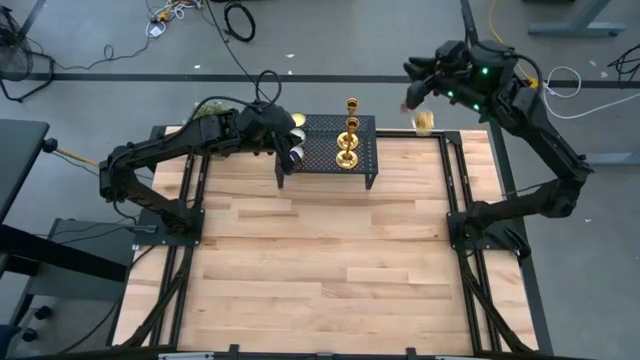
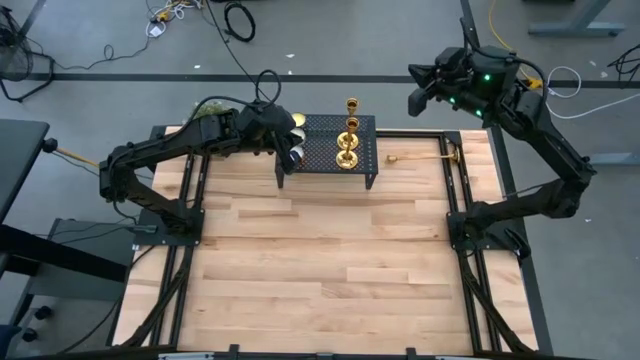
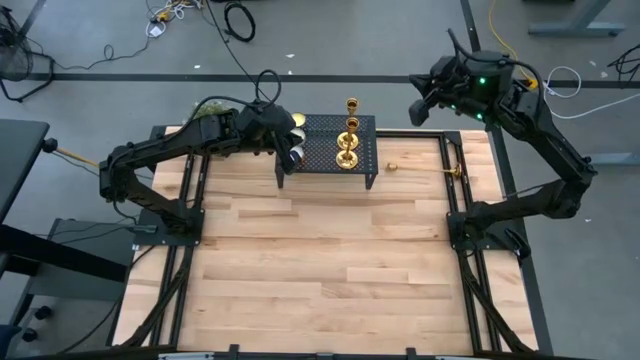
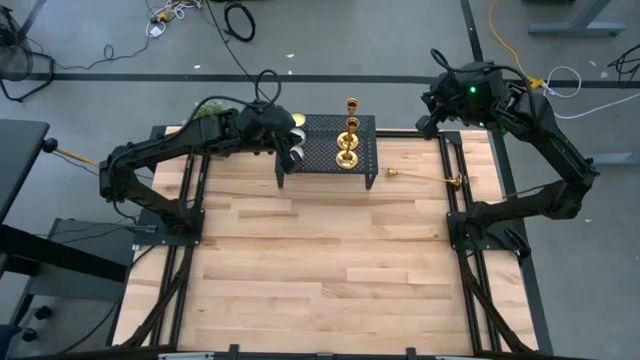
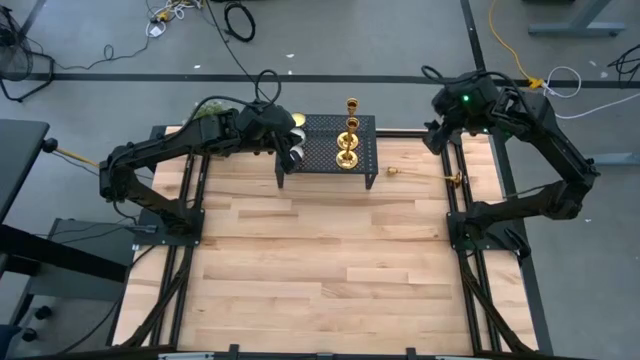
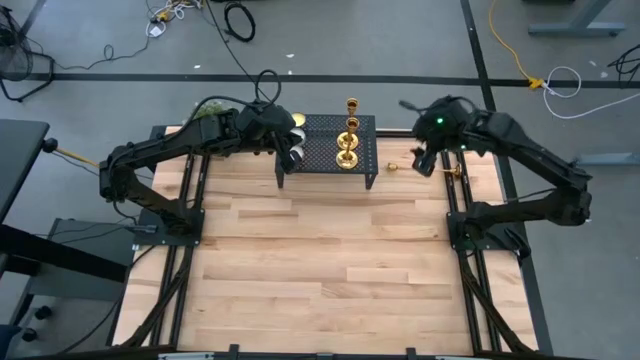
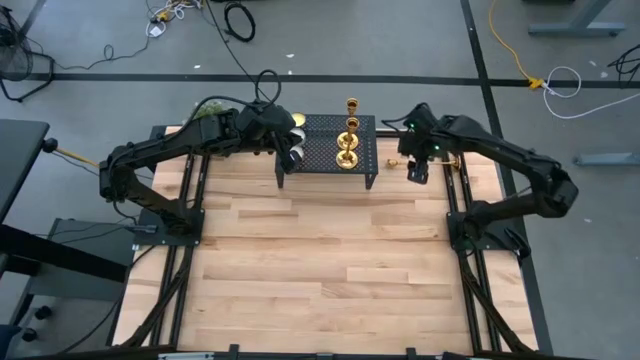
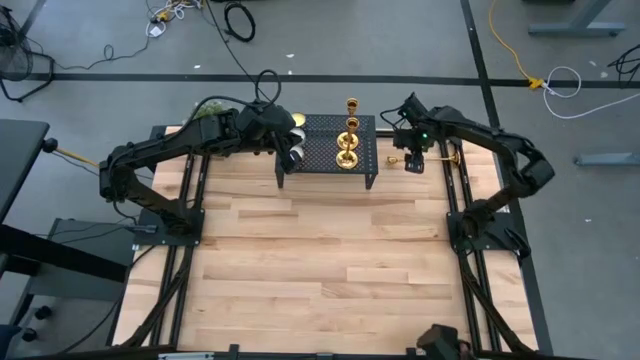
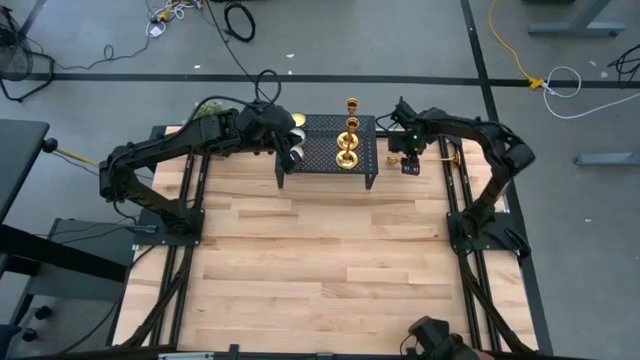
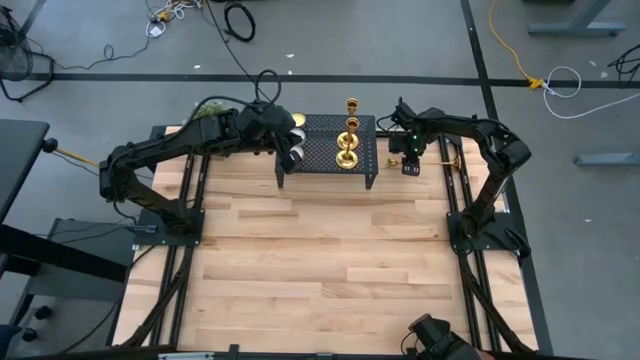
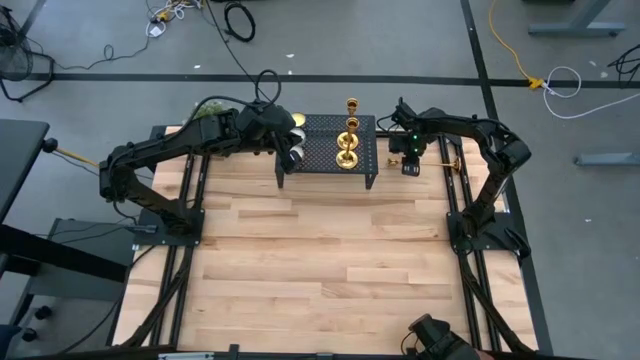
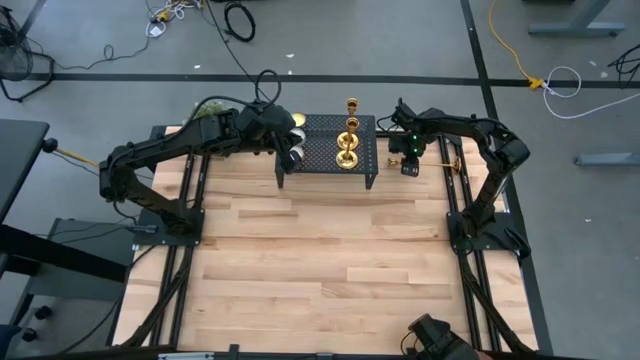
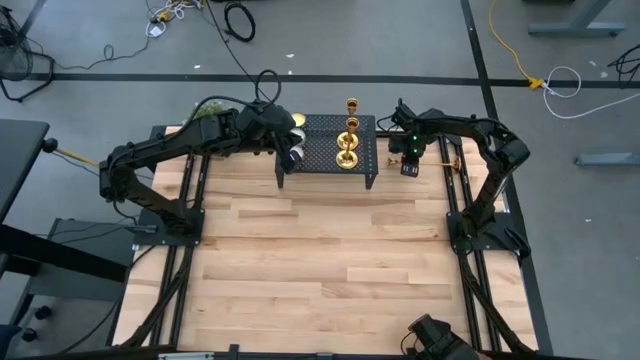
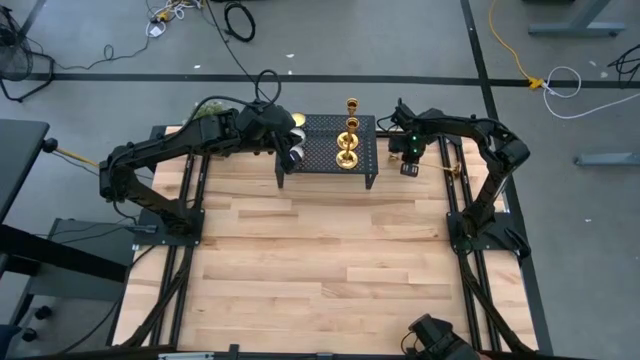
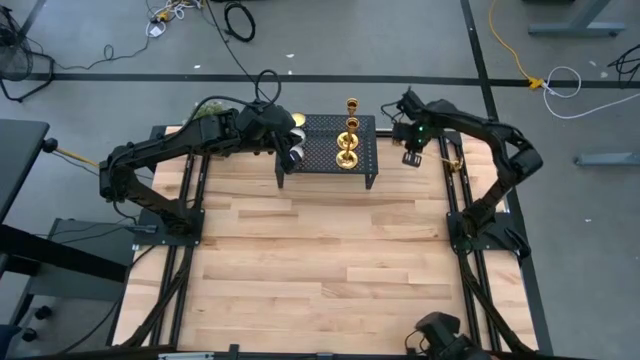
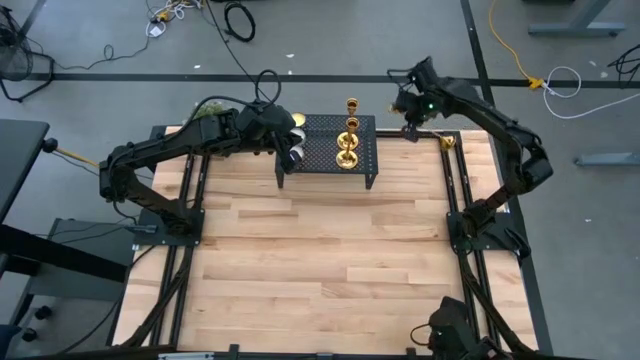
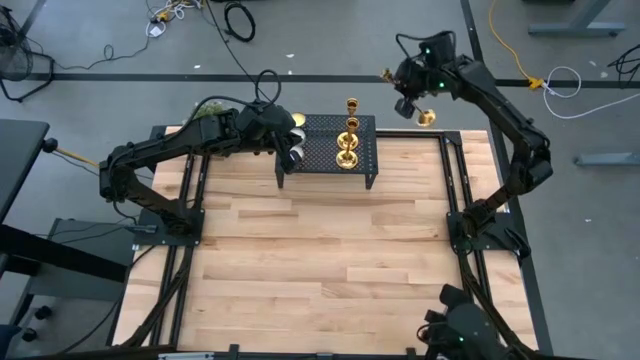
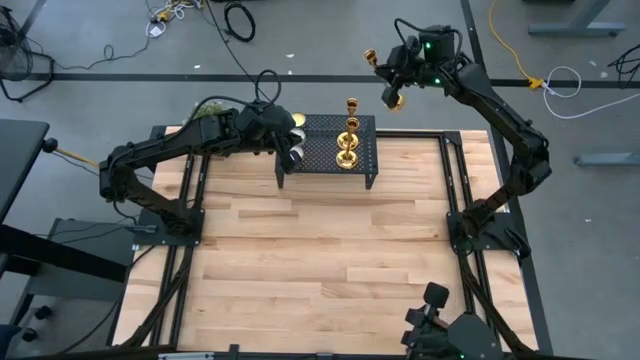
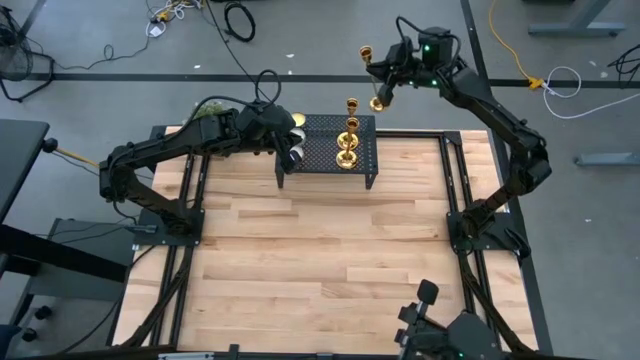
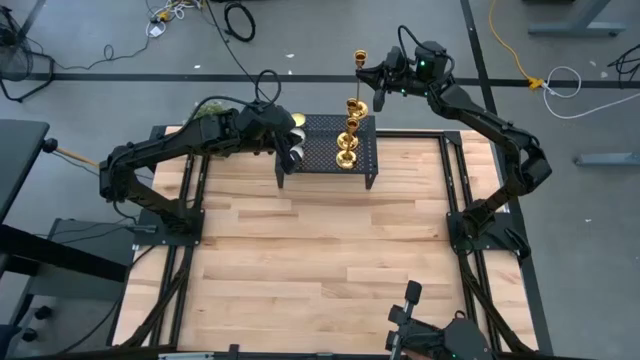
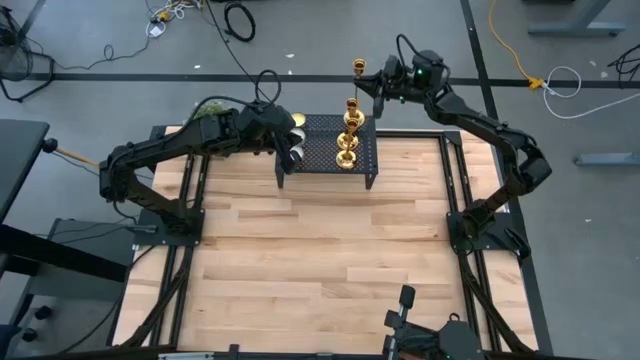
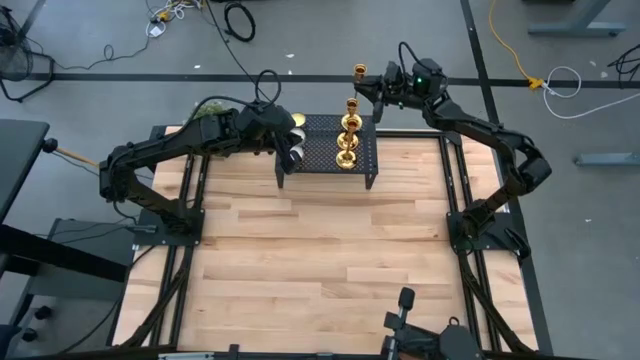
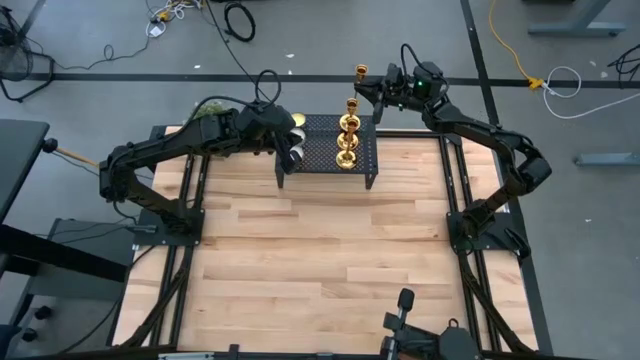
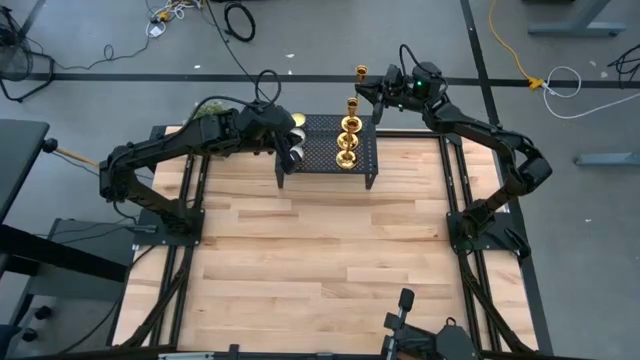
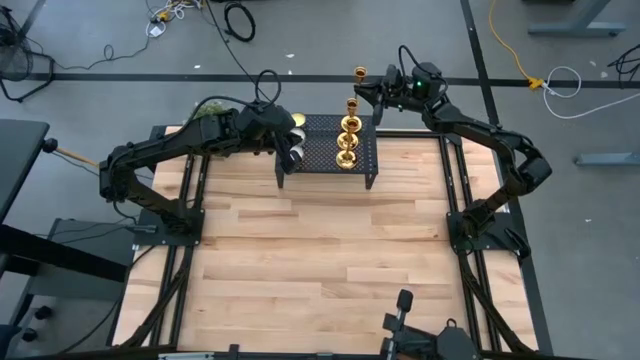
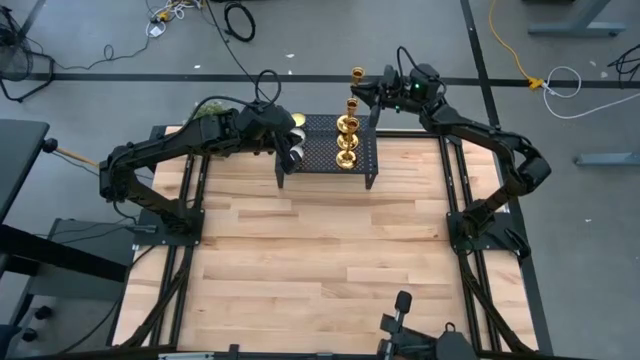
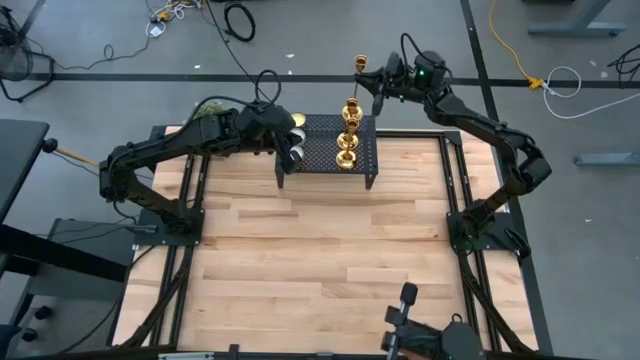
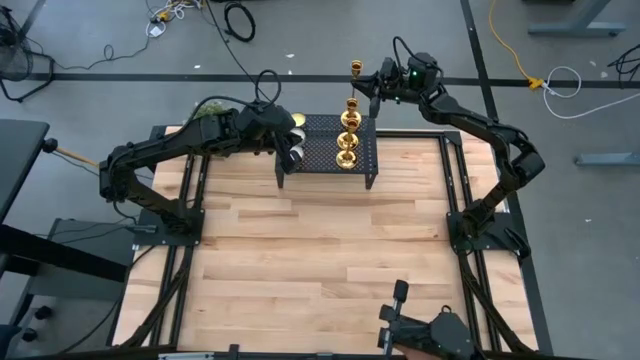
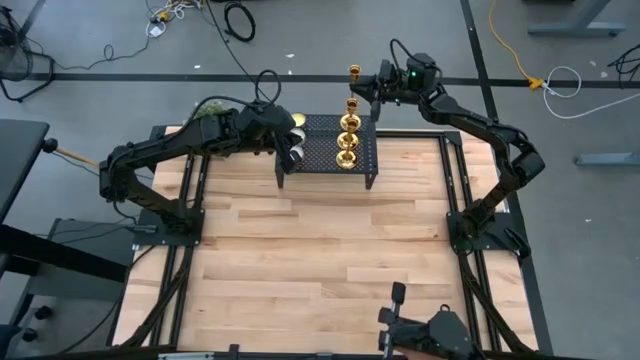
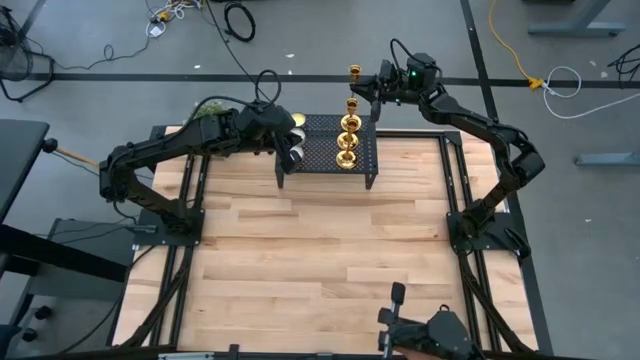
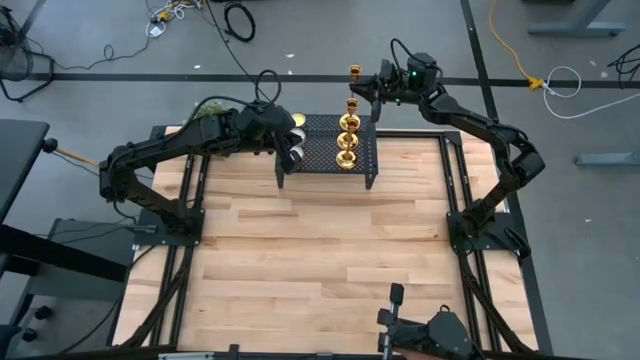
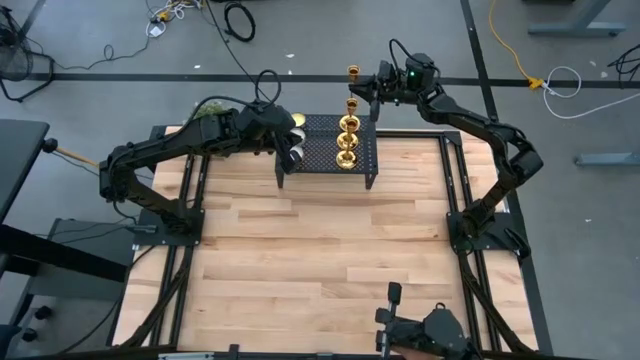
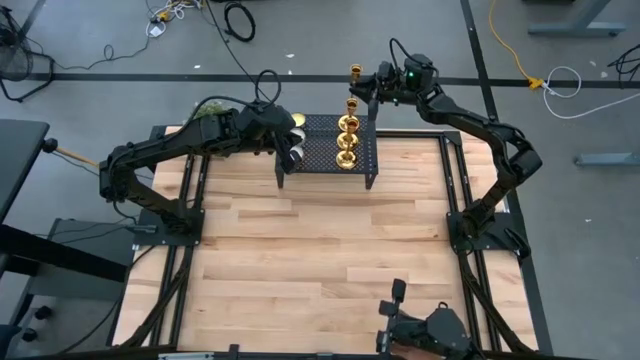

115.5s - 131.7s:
Task: Pick & Place candle stick holders
Put the gold candle holder on the shelf aligned with the other gold candle holders

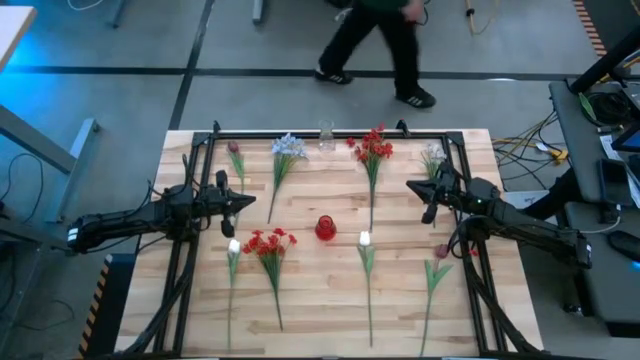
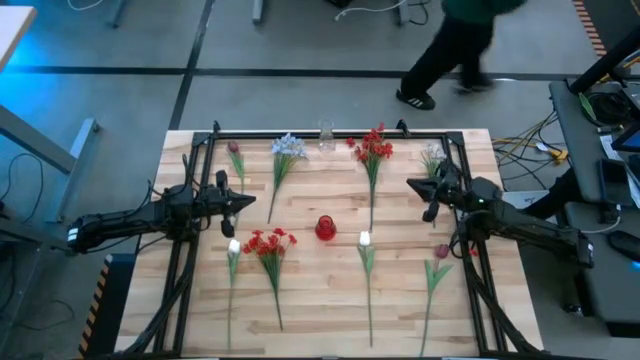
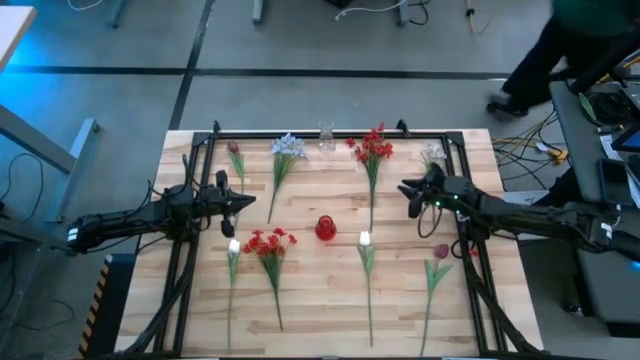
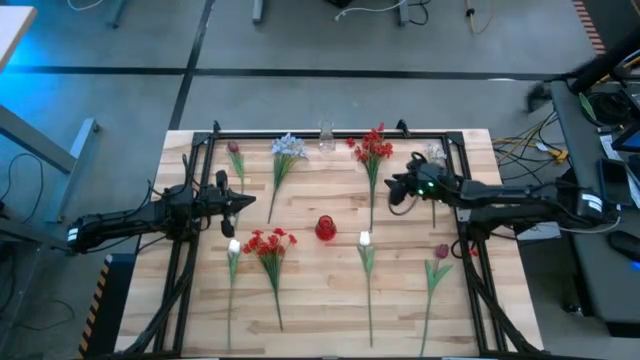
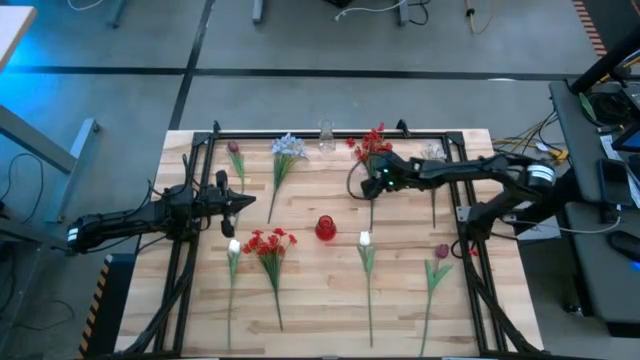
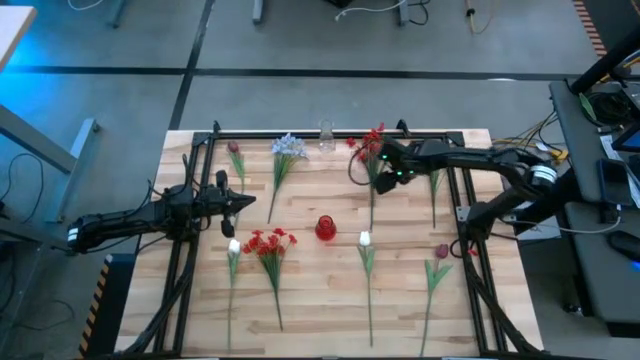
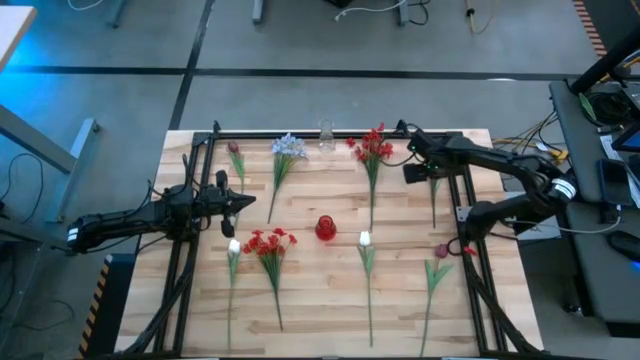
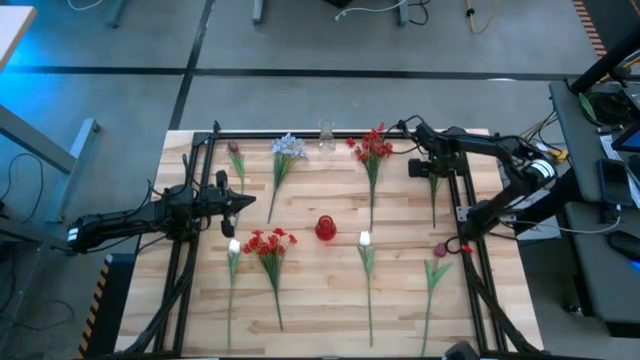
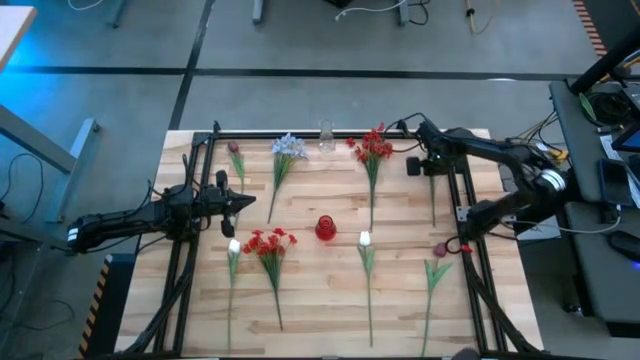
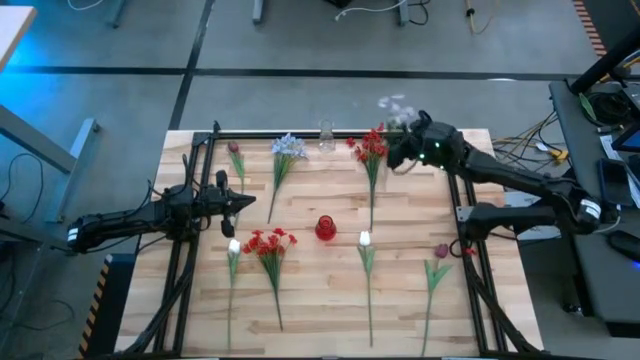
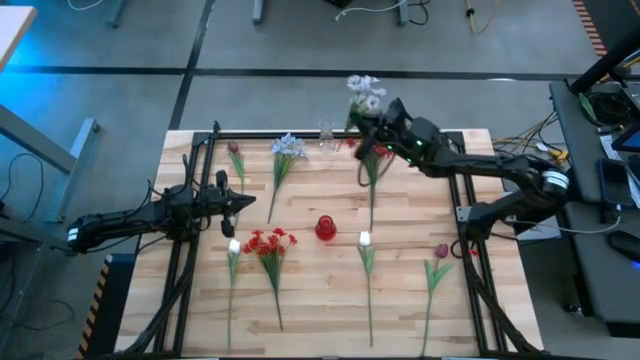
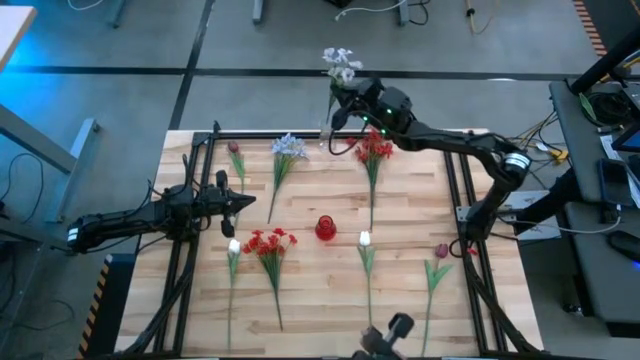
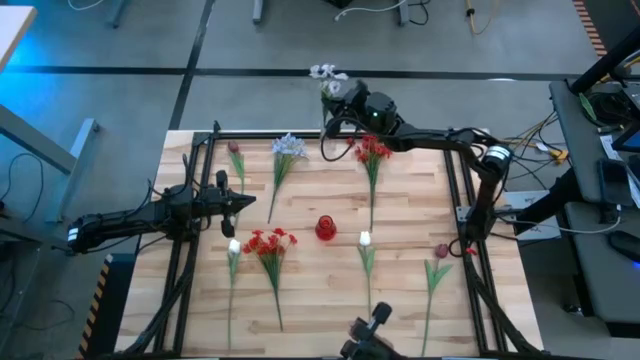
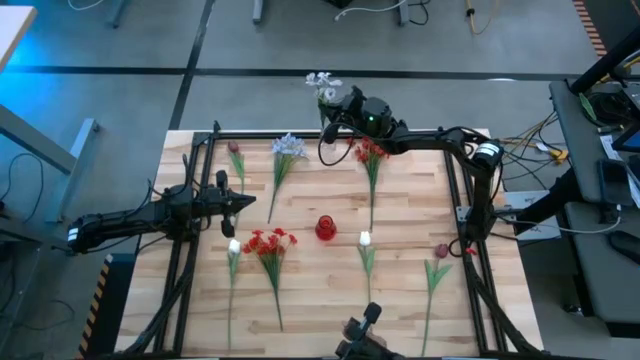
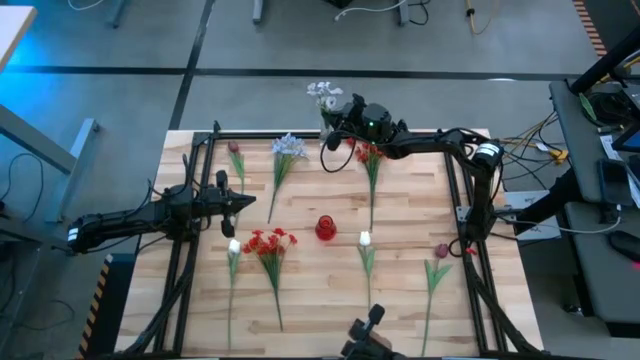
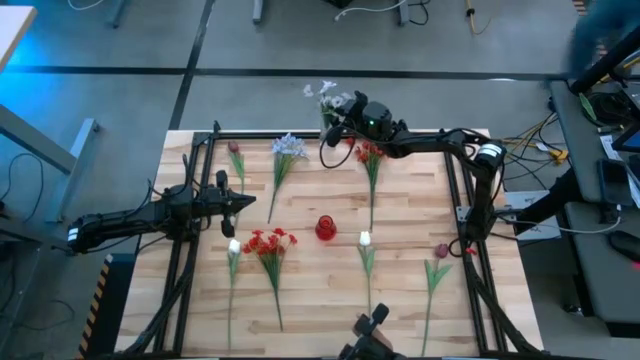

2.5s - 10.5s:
Task: Sort flowers into vase by color
Put the right white flowers into the transparent flower vase
